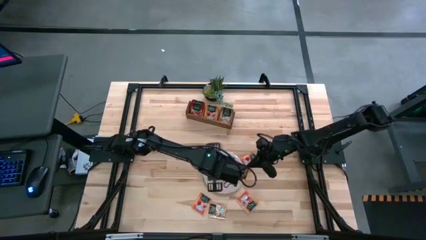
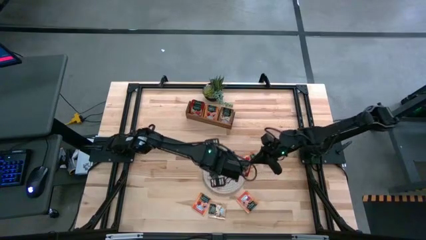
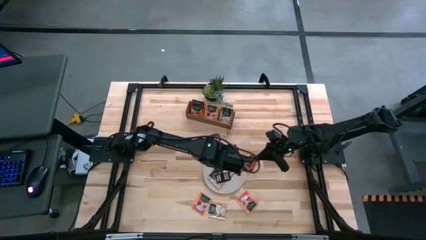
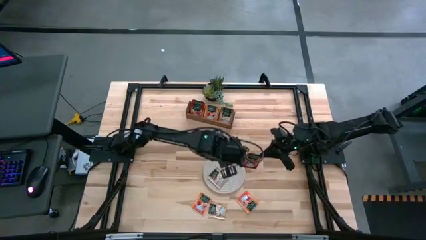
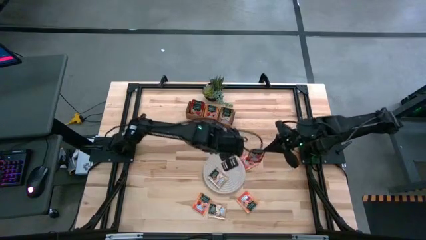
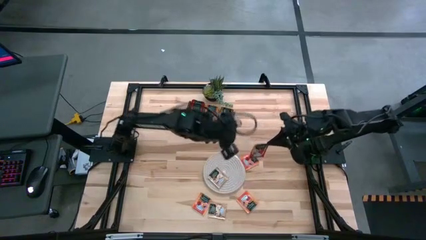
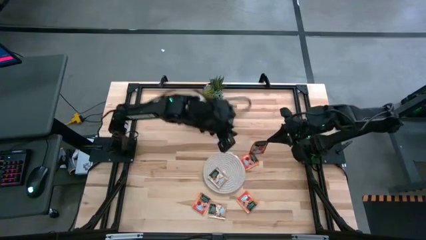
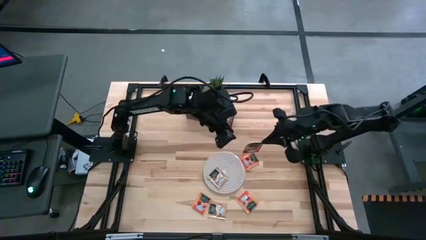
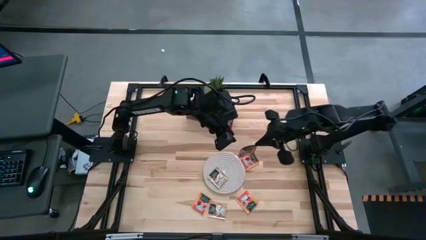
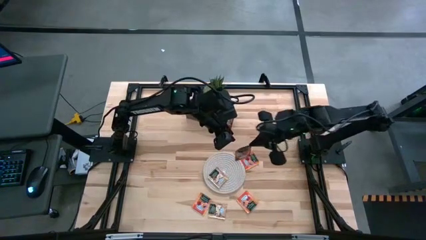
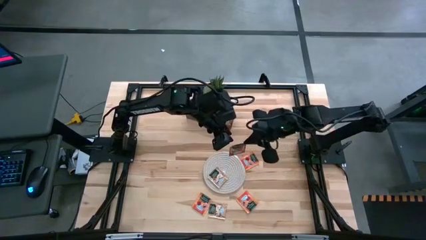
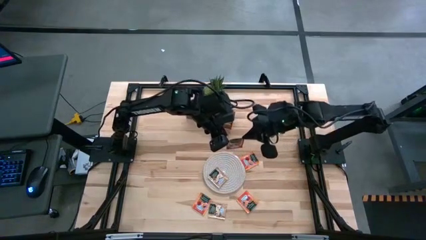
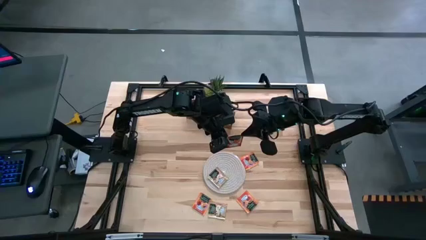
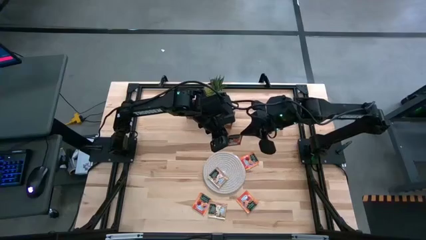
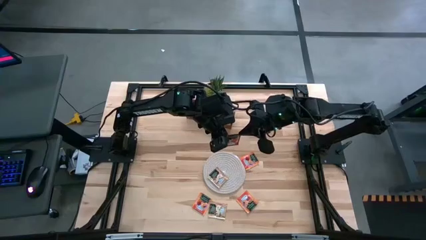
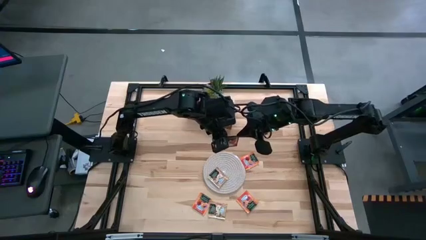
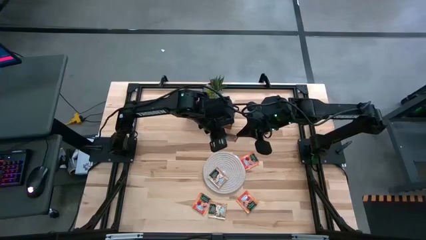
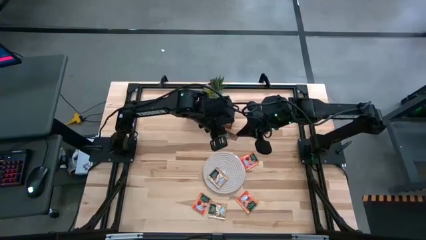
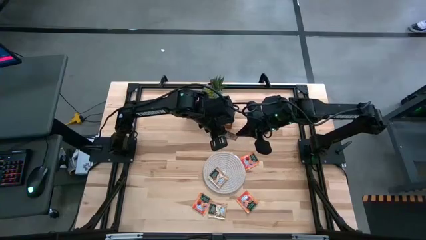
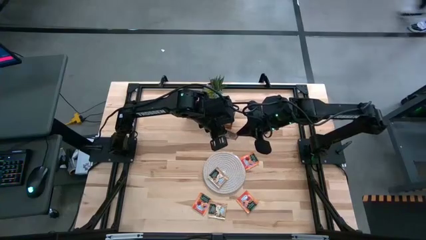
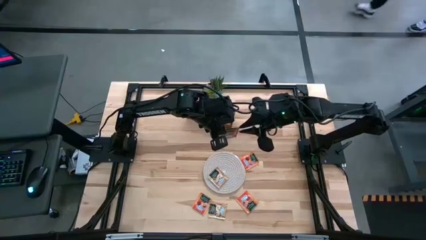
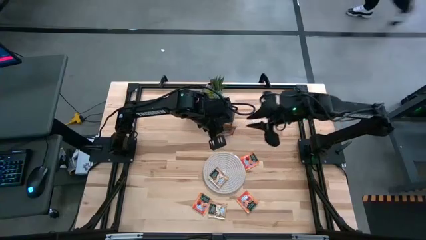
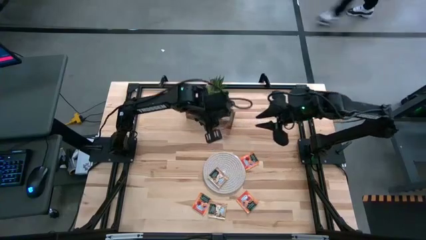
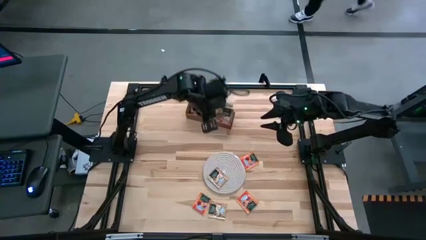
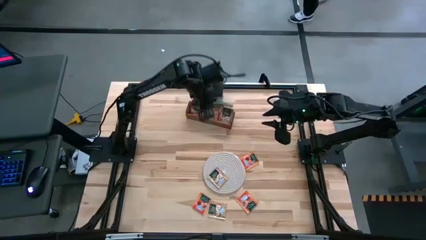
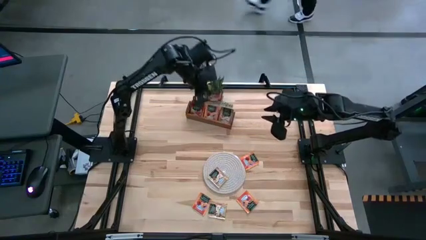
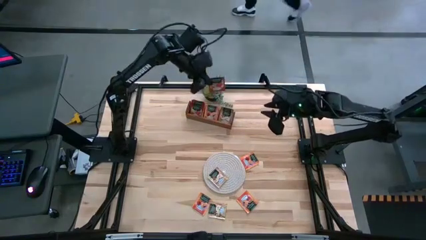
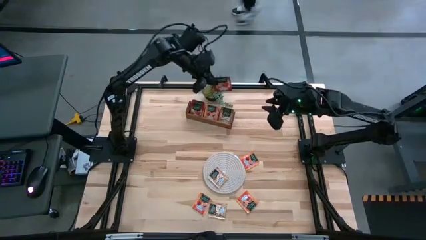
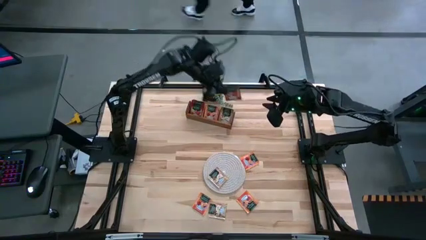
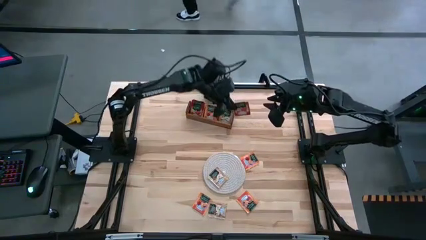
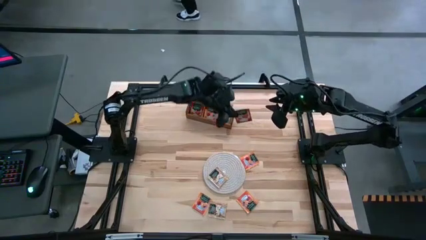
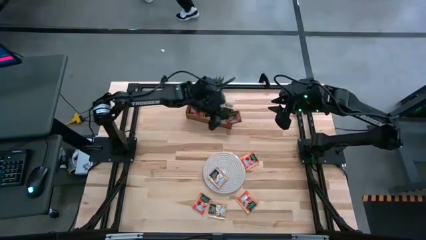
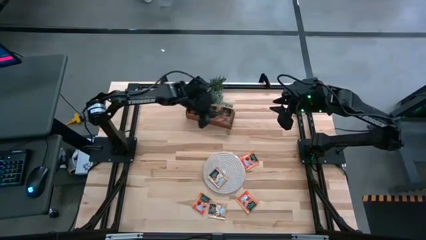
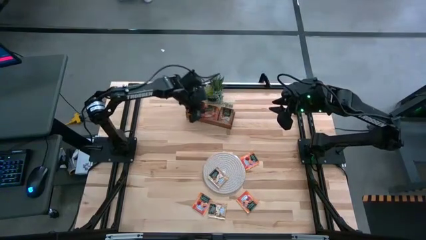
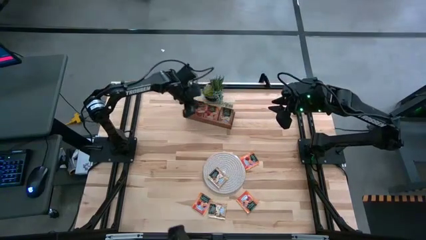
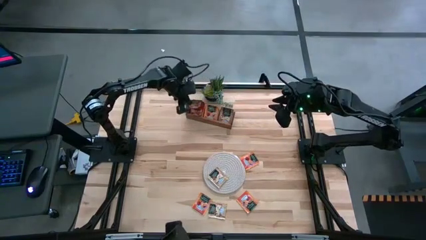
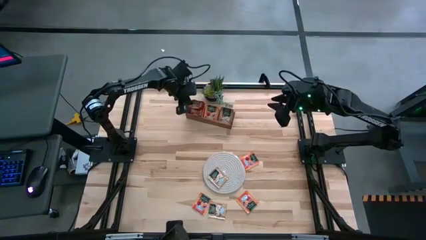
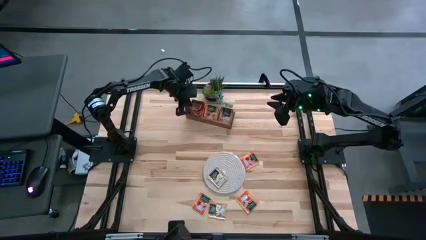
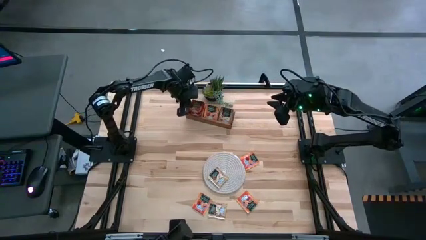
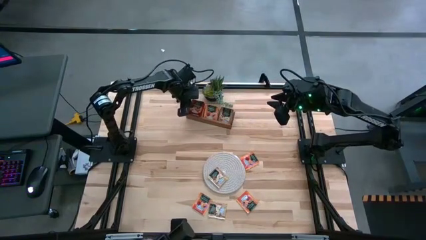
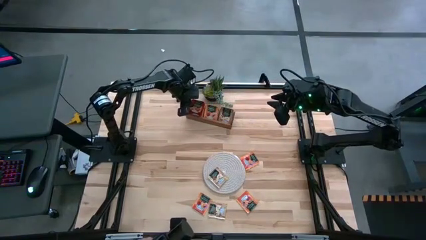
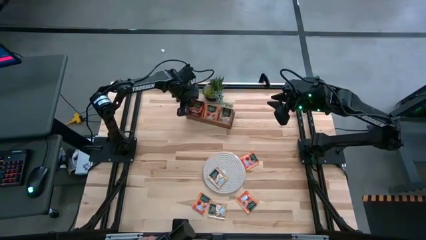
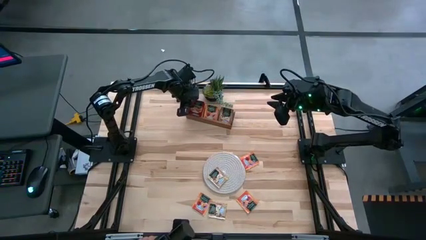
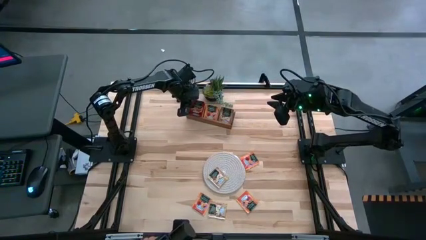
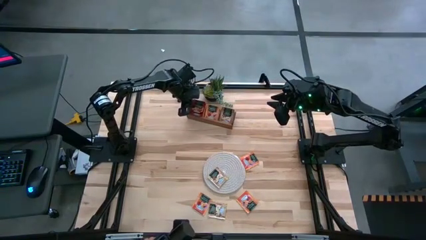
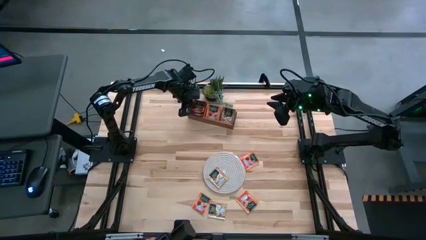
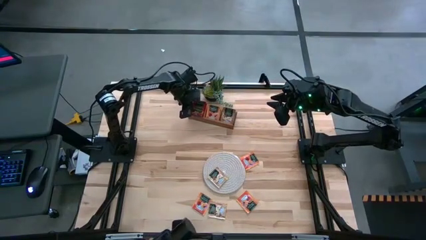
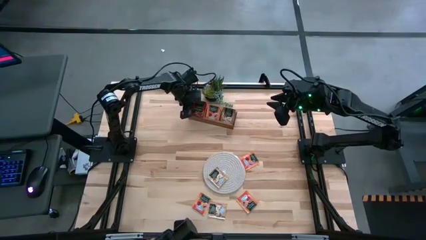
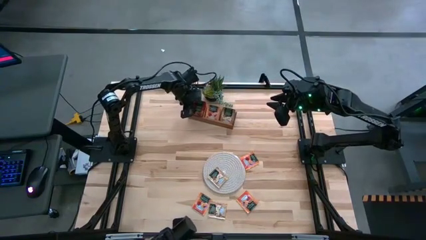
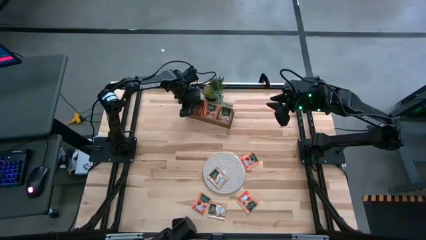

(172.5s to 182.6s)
Task: Pick & Place Tea
Put the red tea bag into the left section of the wooden organizer

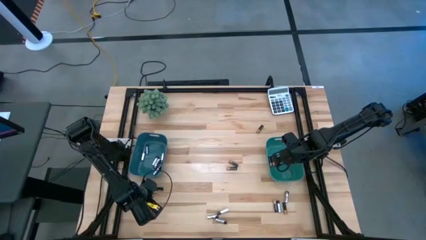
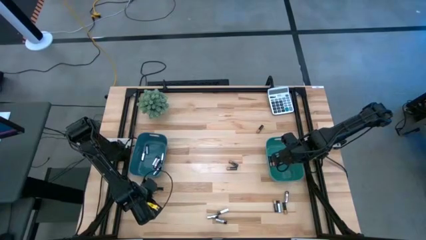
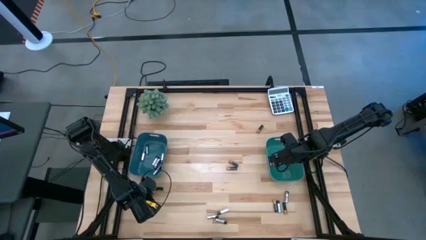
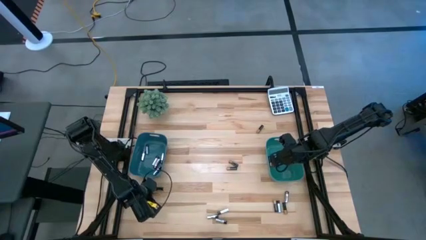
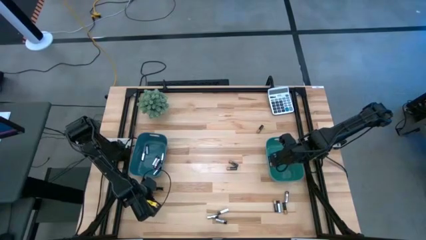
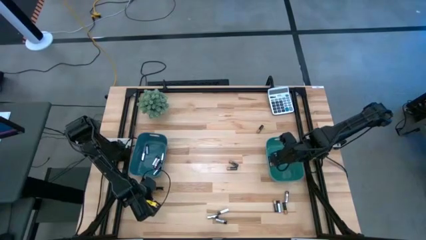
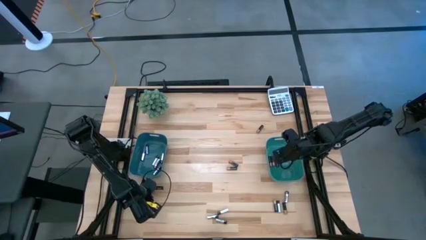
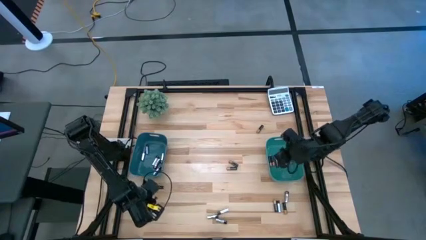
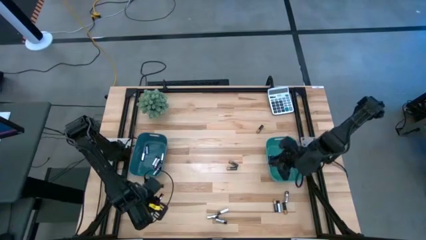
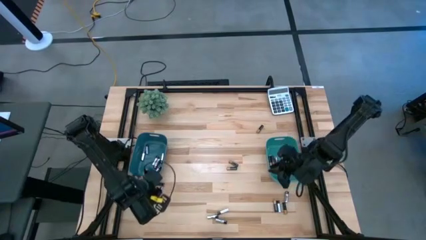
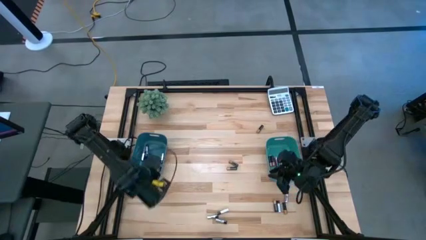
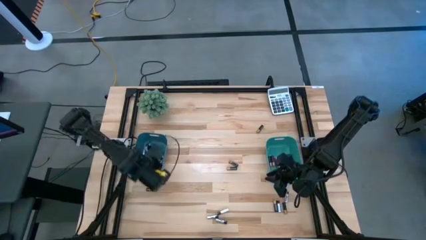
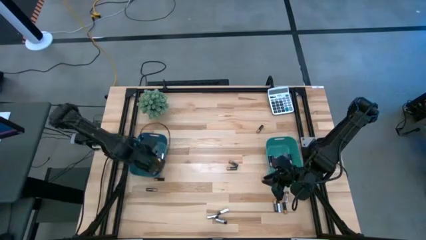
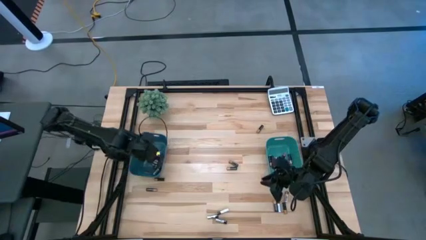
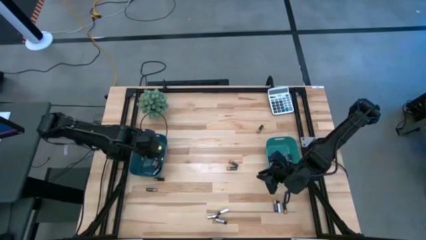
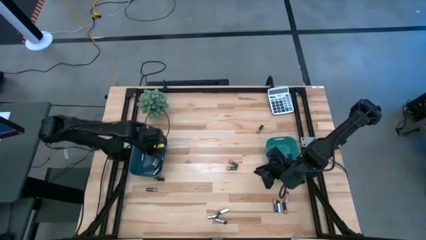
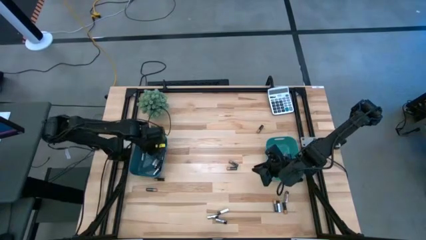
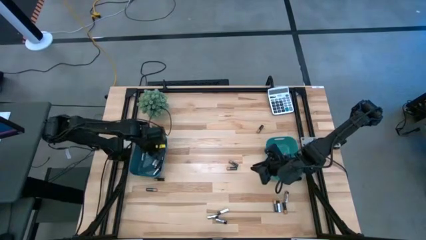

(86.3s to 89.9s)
Task: Sort batteries
Put the silver battery into the blue bin

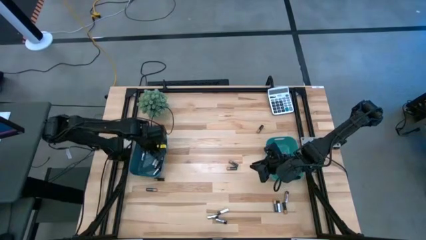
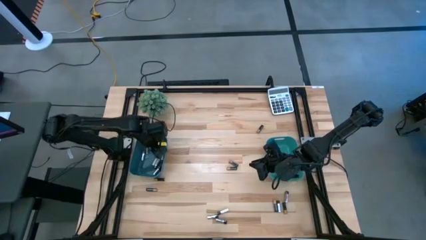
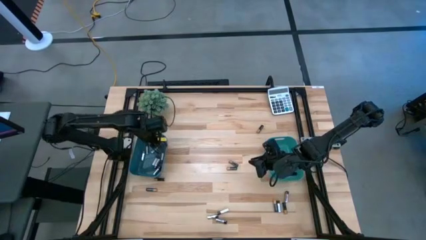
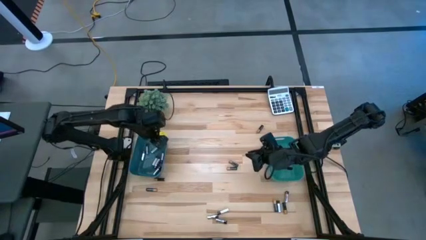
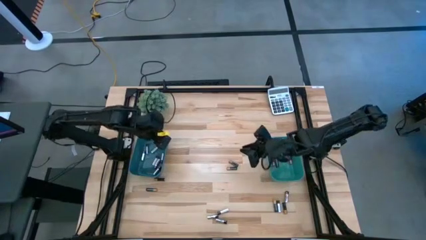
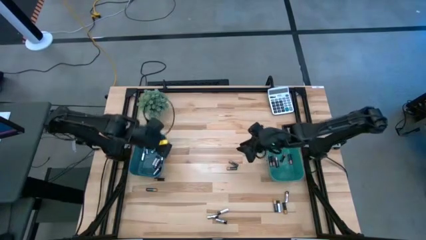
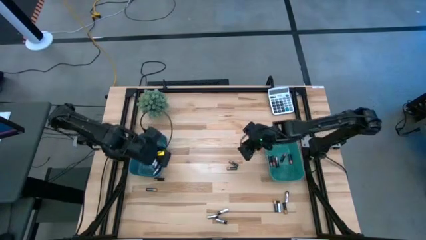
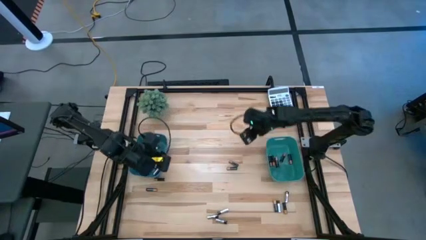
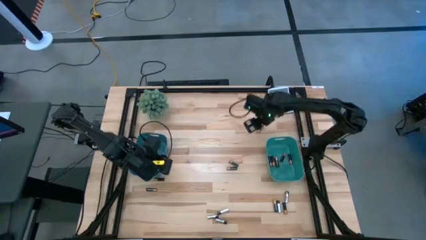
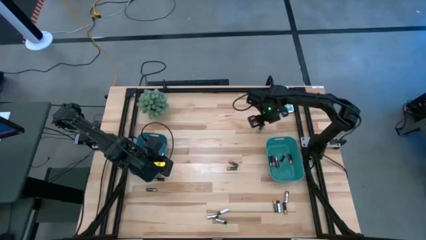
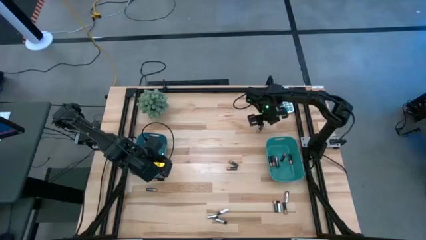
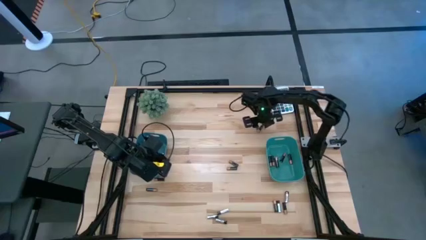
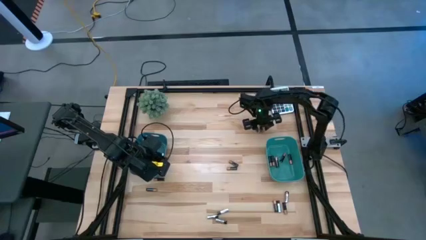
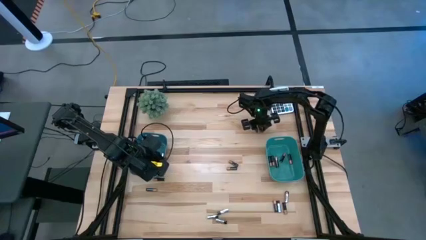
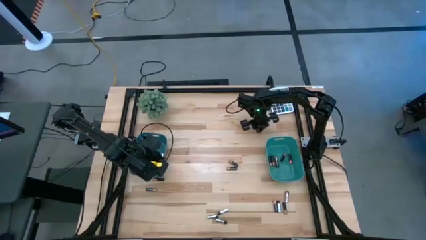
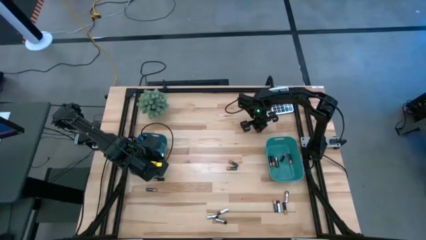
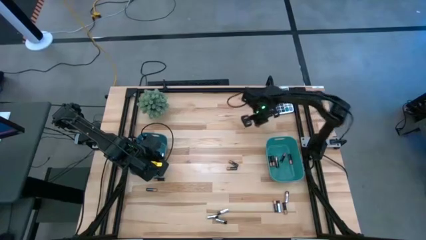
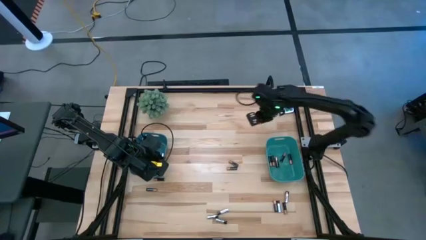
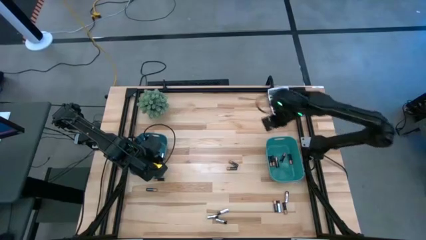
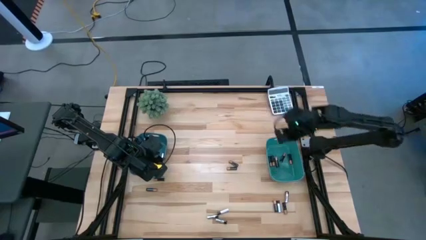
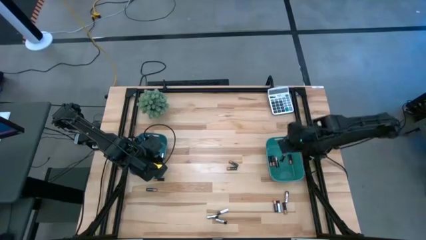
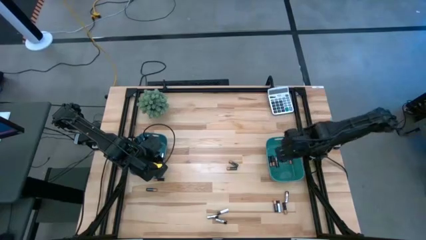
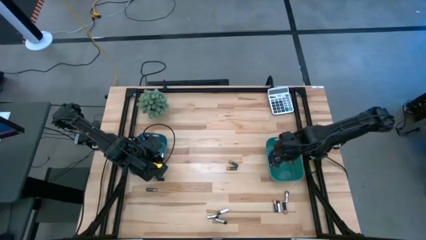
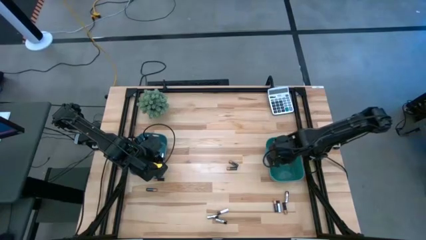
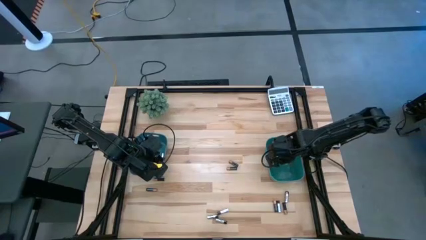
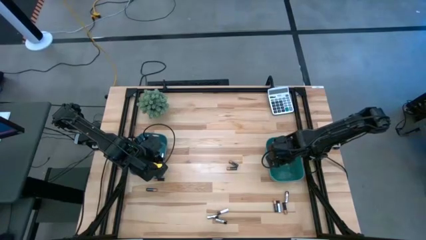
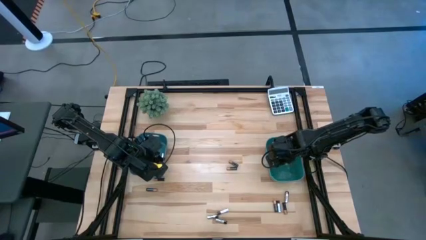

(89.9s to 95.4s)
Put the black battery into the green bin
